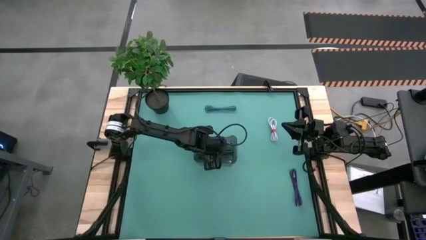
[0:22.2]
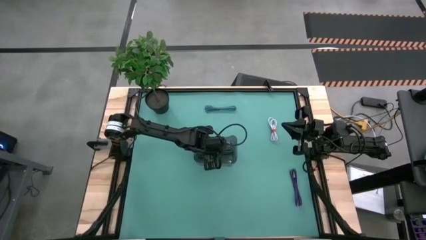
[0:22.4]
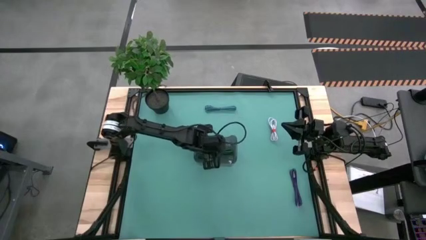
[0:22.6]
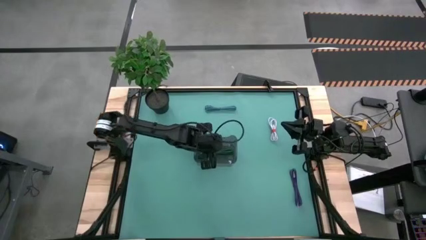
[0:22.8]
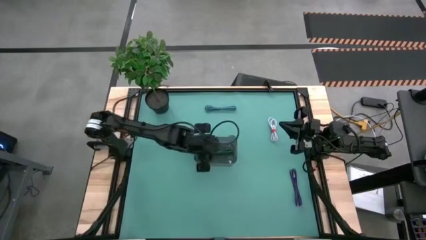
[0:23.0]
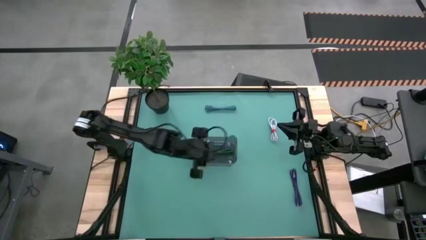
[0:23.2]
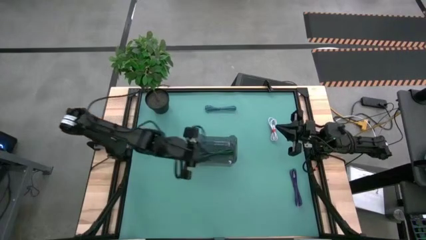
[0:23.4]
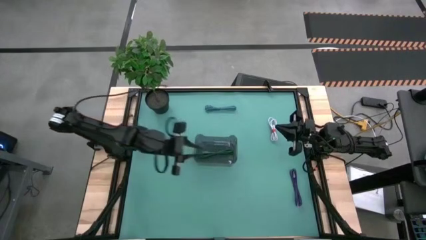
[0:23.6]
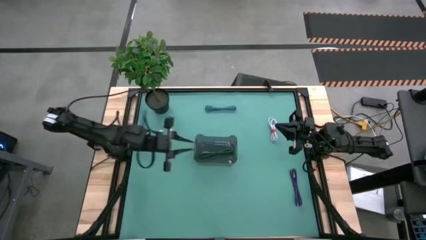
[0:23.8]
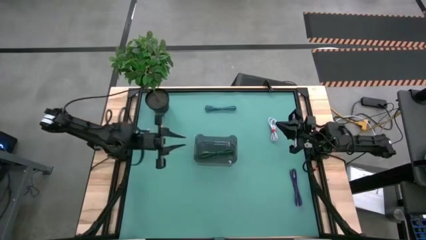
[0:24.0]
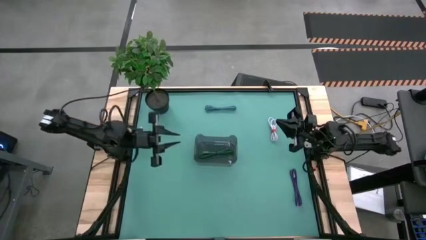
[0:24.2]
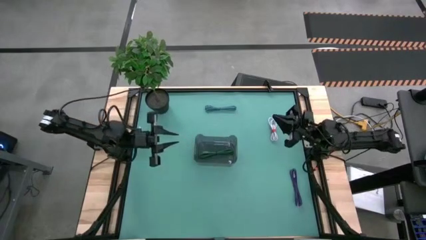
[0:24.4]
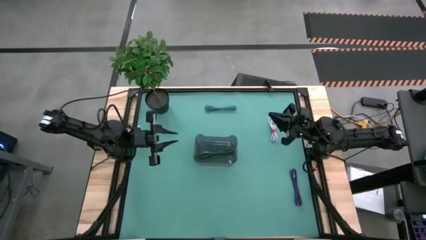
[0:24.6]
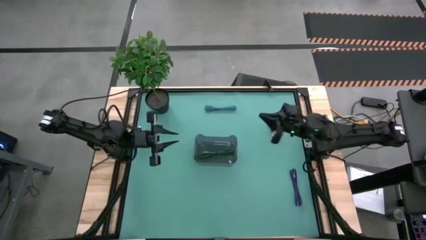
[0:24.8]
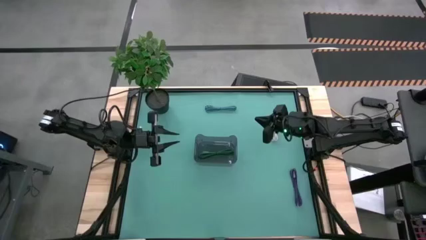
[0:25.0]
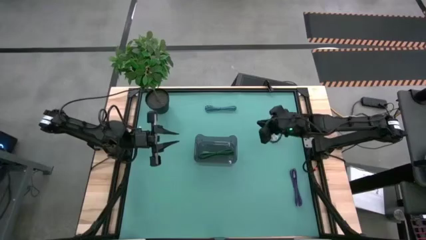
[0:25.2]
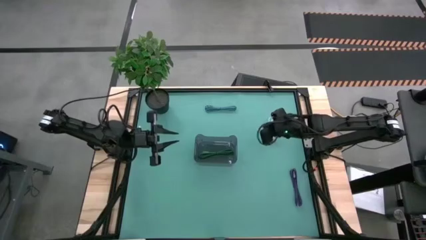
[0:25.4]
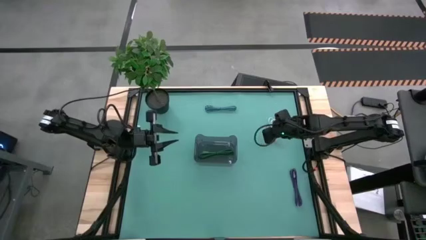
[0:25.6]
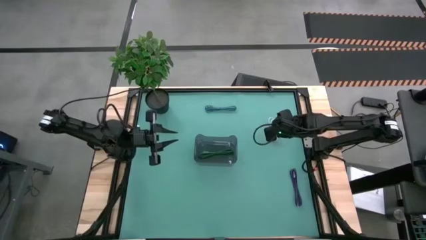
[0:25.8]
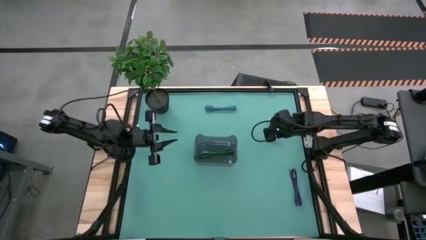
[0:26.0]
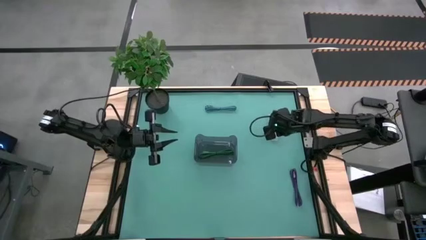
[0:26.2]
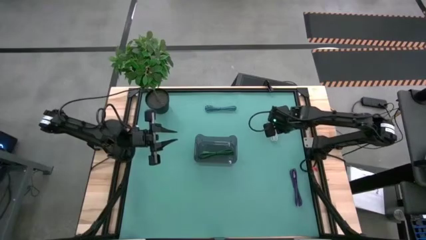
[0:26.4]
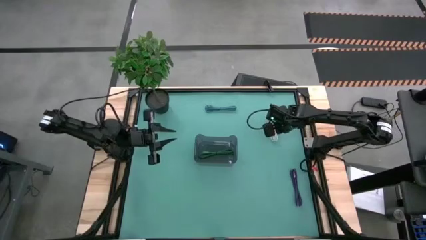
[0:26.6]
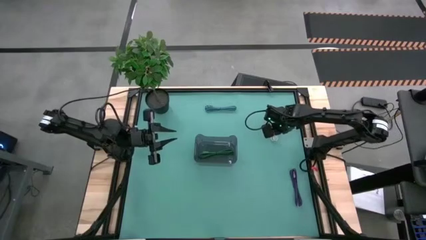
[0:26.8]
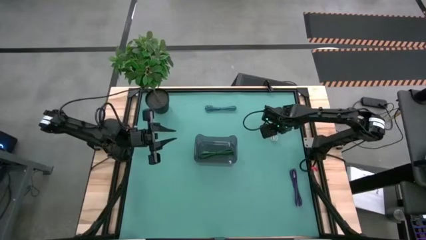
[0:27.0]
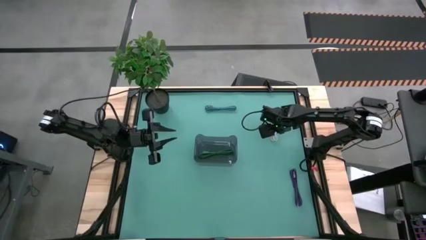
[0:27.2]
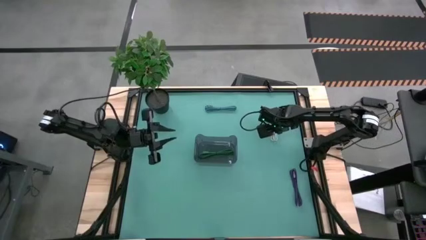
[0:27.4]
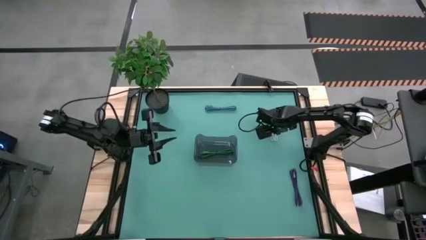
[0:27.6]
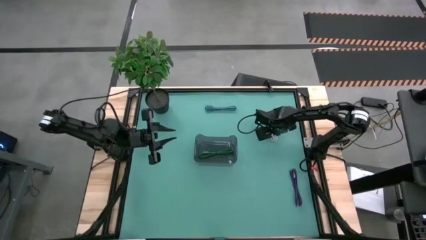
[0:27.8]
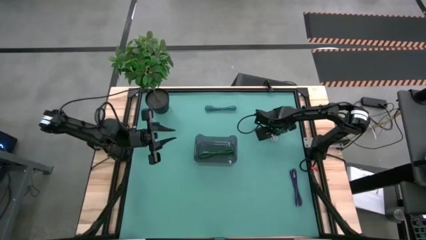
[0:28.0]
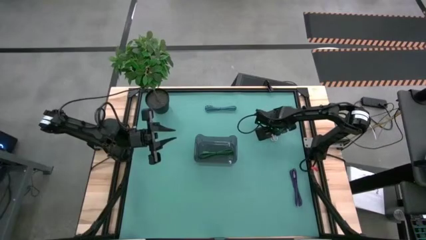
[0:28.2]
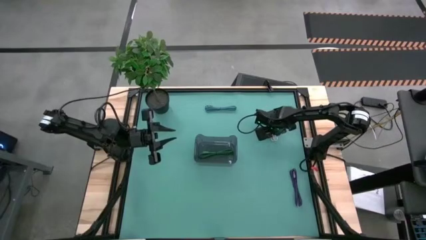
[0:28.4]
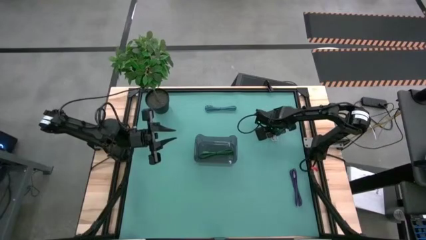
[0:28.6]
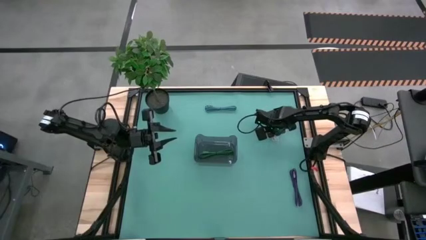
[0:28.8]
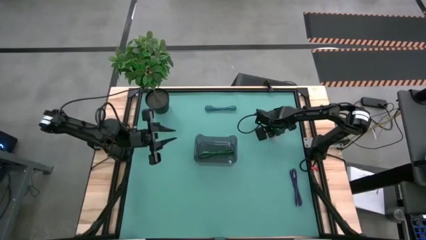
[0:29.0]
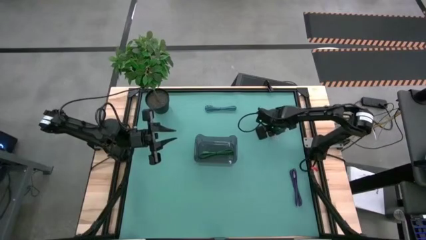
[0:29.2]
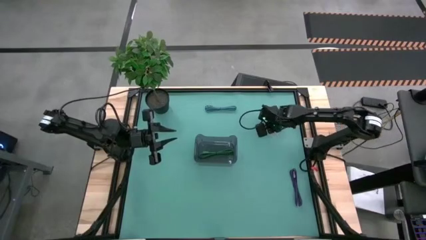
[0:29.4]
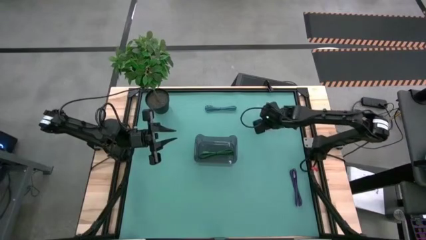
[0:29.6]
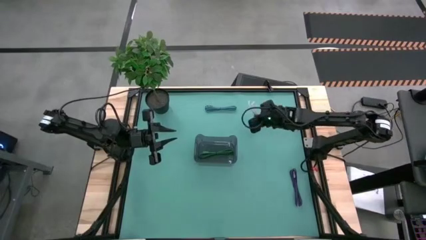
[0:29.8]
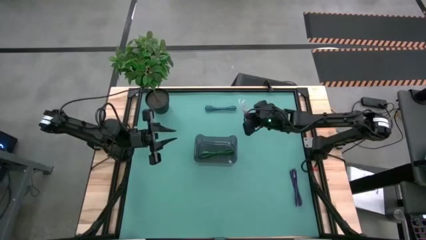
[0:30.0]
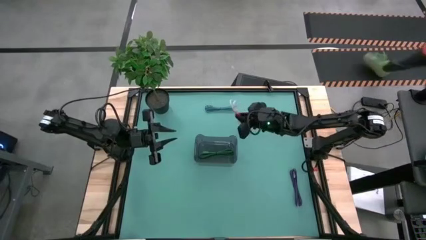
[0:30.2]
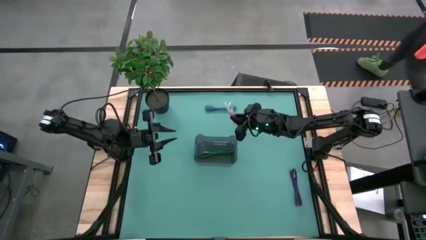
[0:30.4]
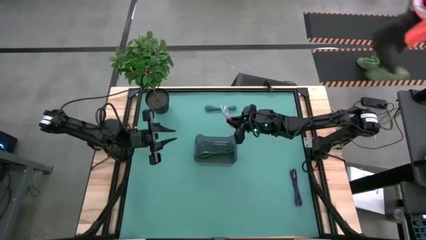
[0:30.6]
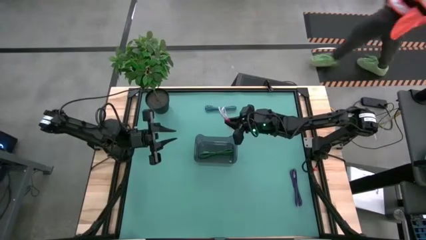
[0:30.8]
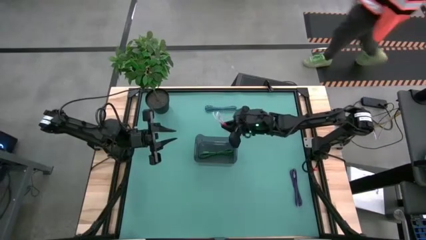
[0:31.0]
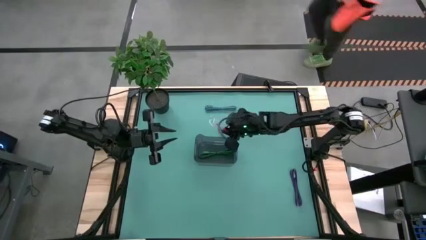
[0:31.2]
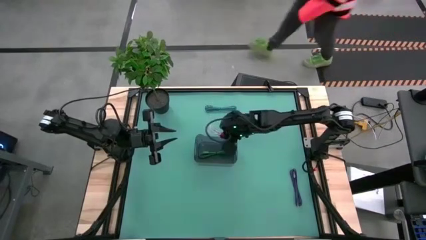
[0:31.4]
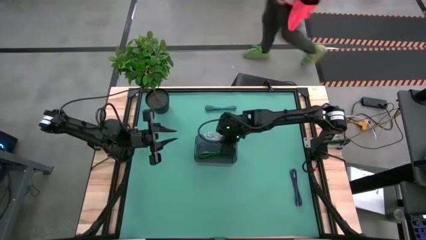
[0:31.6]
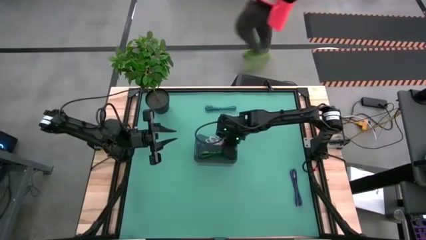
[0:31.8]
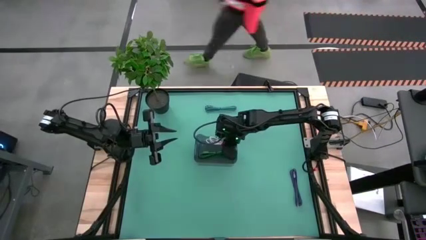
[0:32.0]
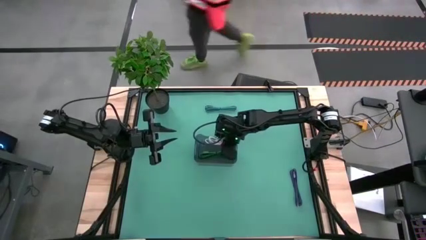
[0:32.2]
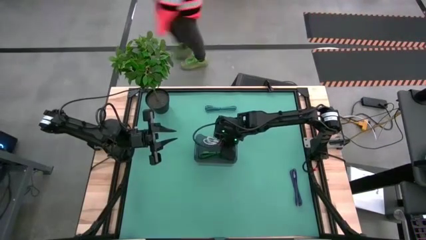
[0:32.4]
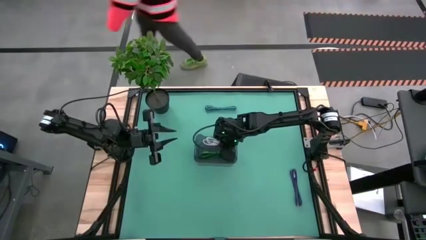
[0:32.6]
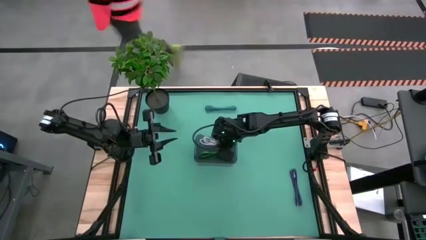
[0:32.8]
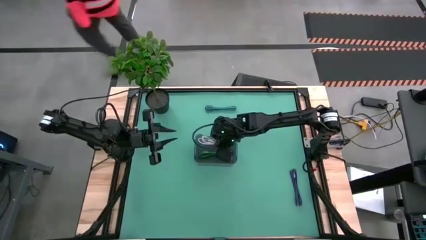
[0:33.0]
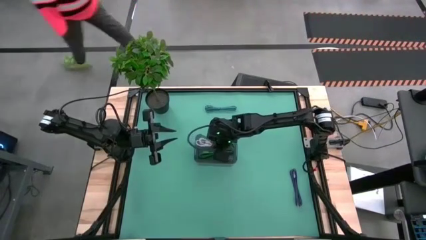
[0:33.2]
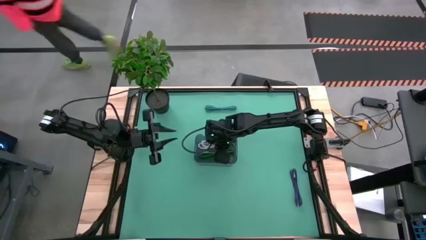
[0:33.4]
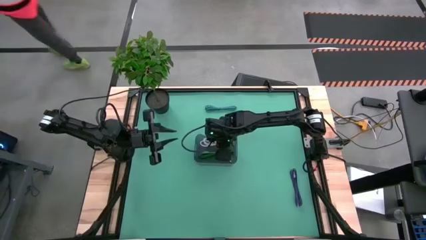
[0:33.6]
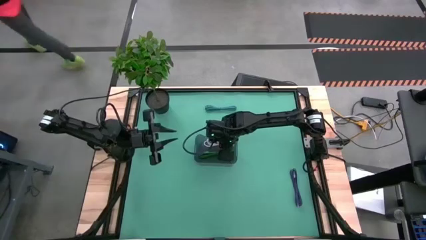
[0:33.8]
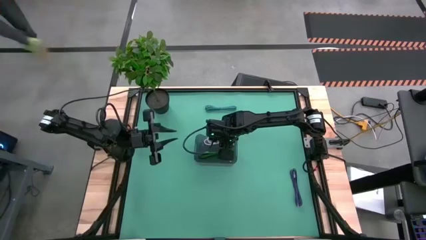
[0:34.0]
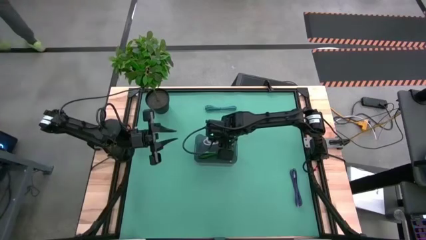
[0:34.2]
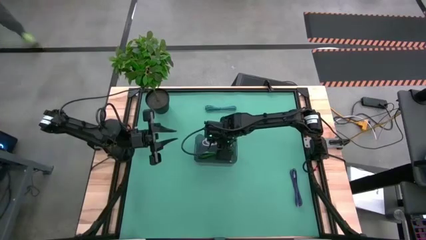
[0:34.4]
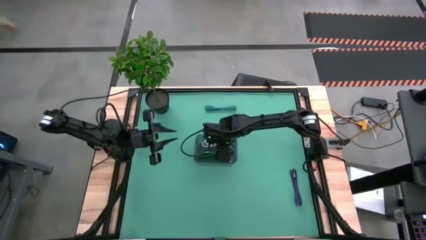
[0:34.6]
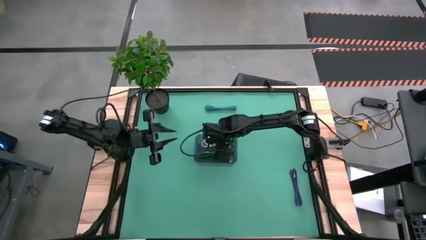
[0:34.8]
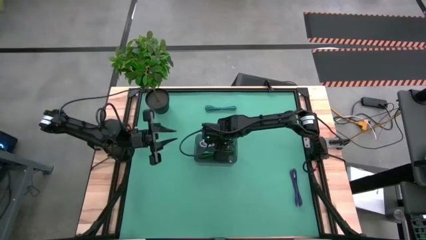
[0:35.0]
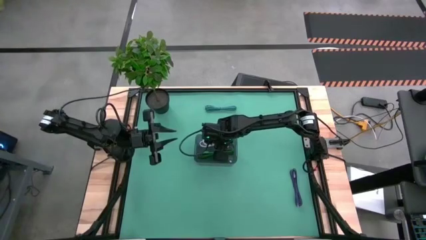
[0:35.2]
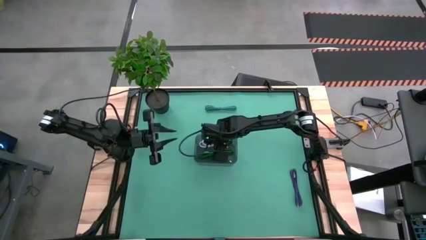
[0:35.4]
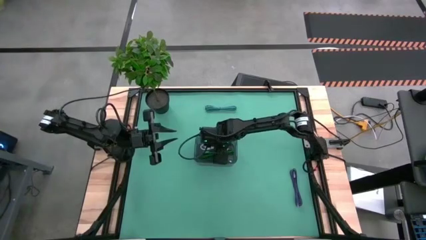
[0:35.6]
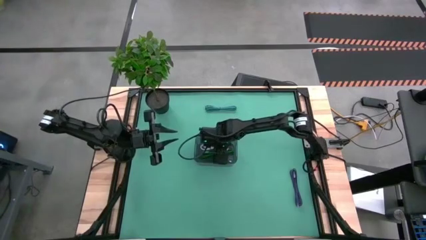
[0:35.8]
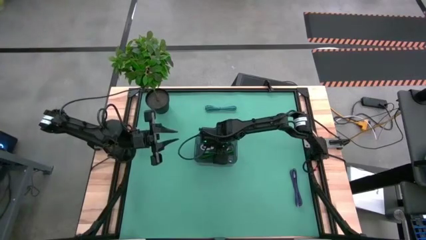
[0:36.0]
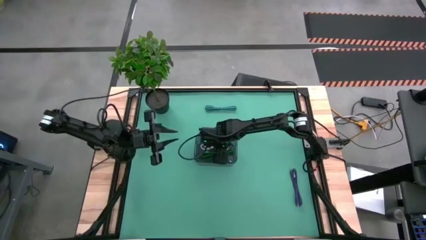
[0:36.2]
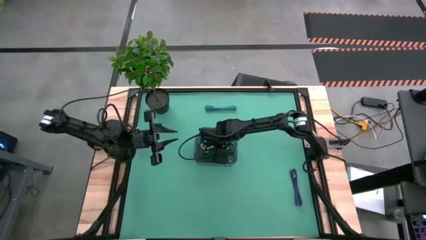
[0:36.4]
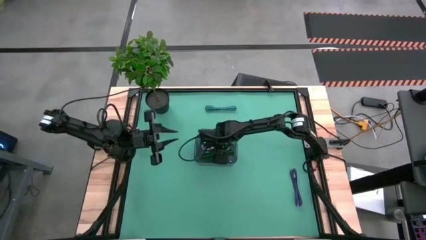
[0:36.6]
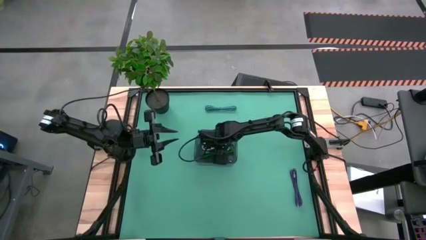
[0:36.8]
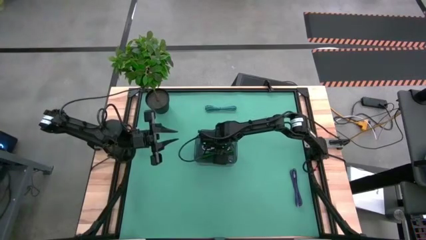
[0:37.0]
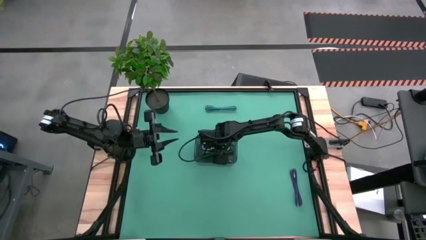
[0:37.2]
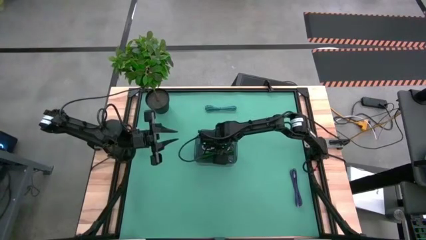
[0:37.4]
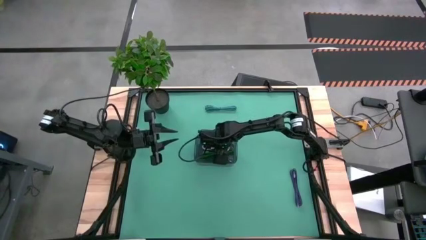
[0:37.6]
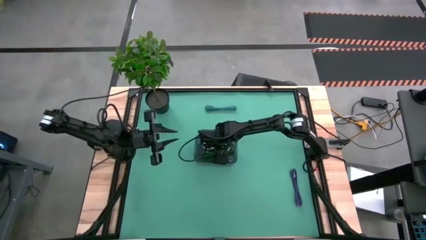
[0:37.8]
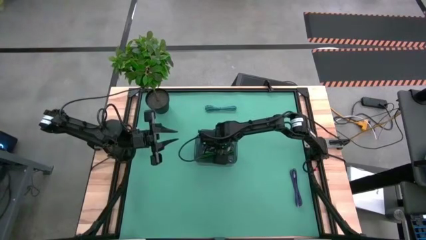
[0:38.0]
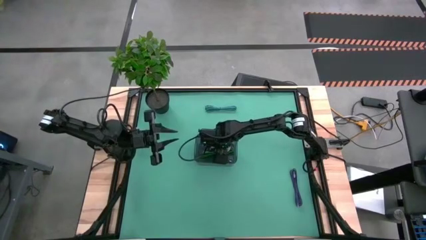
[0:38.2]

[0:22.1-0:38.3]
Task: Pick and place USB-C Cables
Put the white cable into the black transparent container
